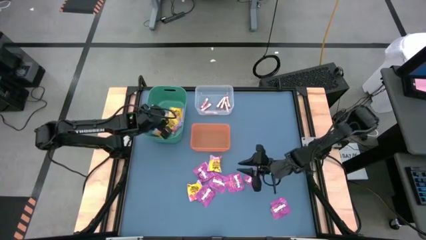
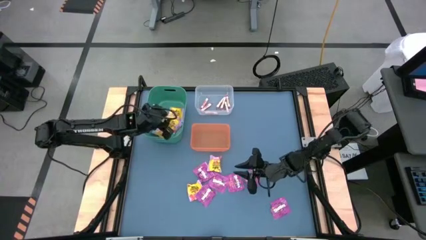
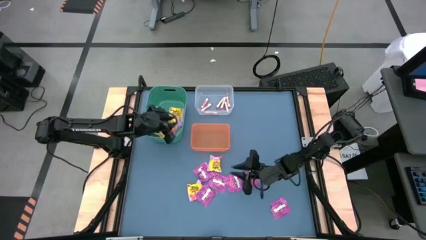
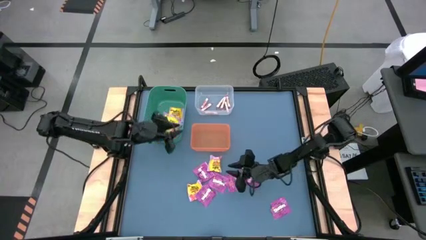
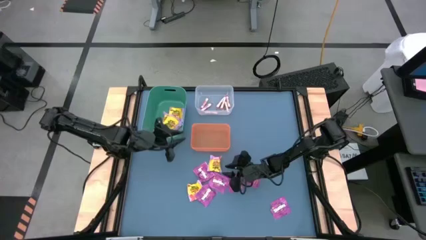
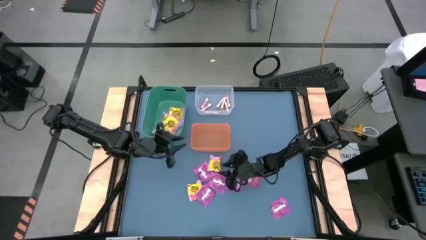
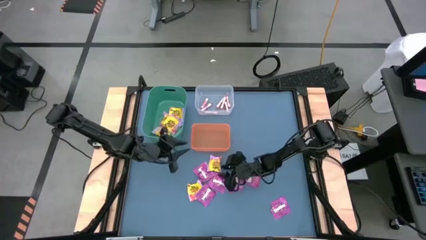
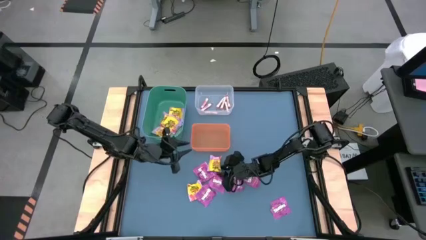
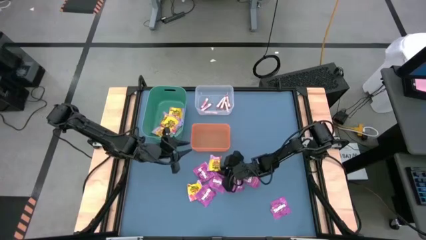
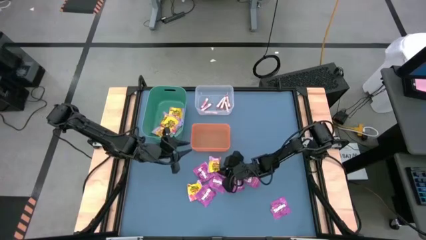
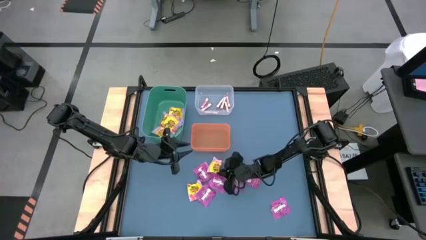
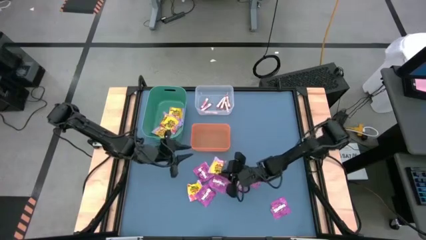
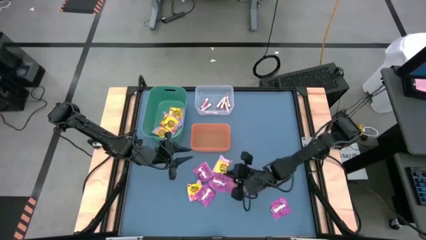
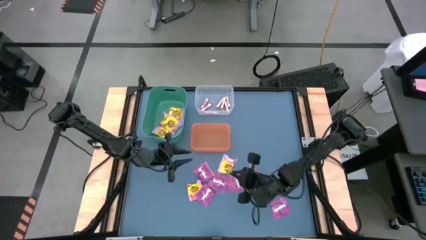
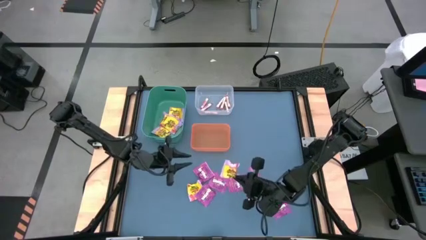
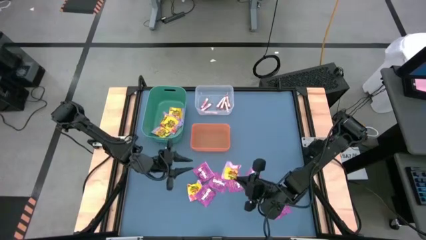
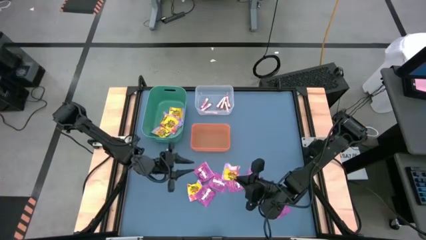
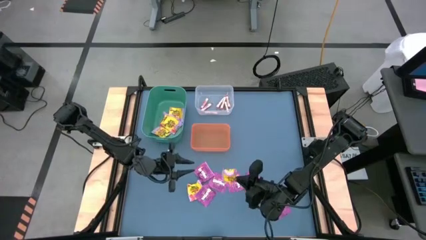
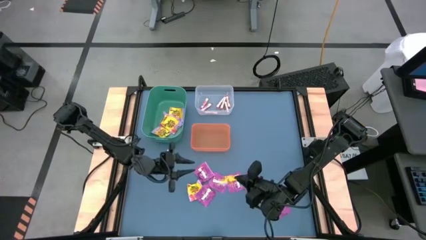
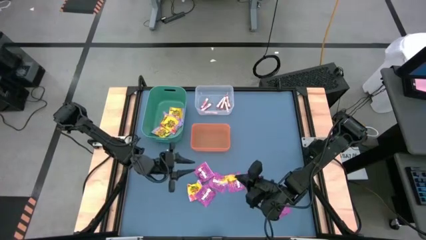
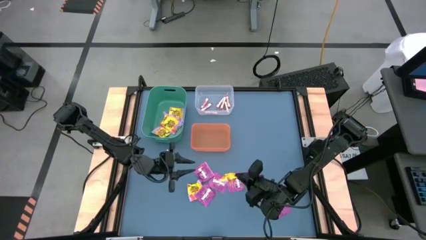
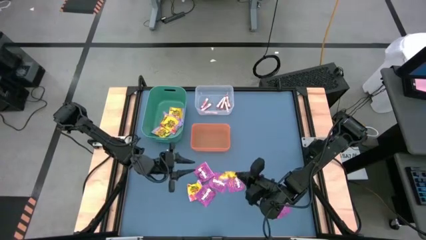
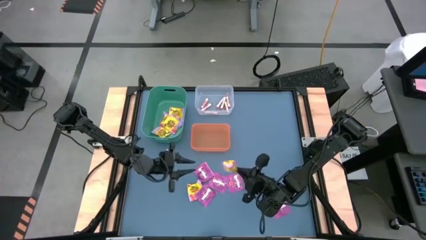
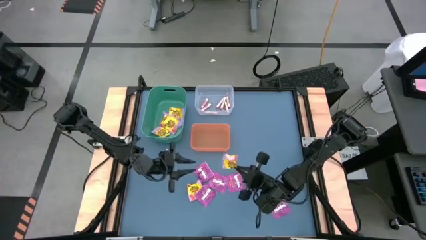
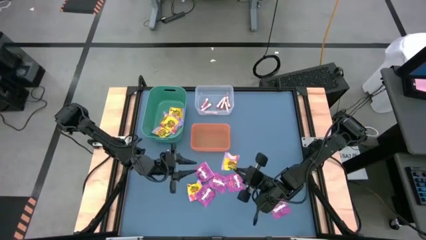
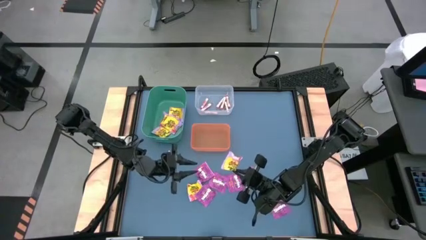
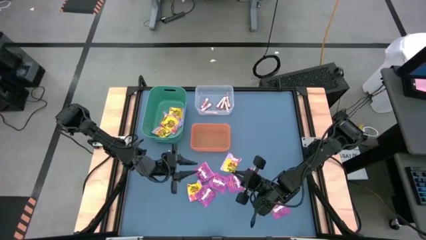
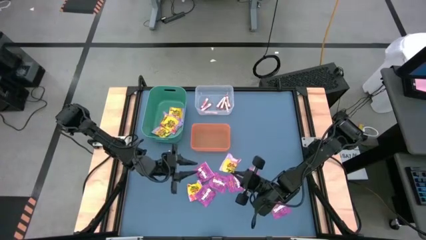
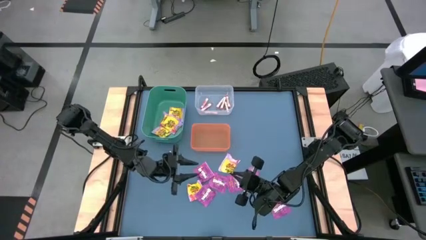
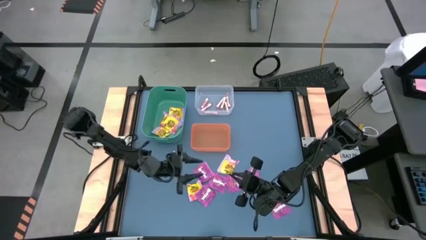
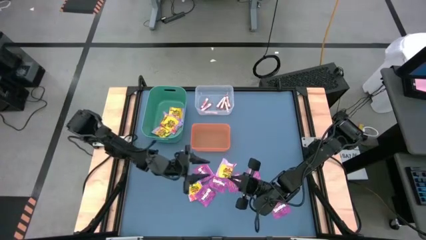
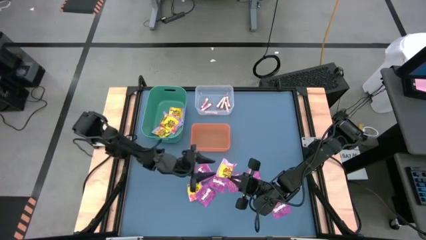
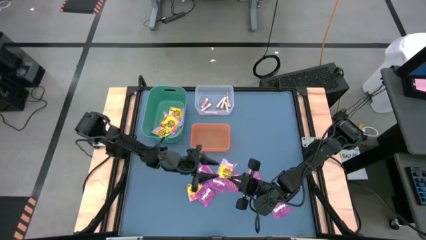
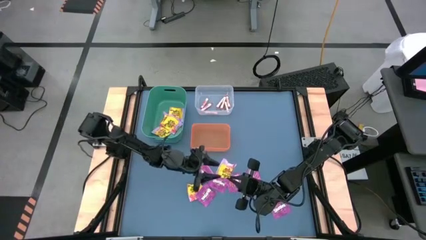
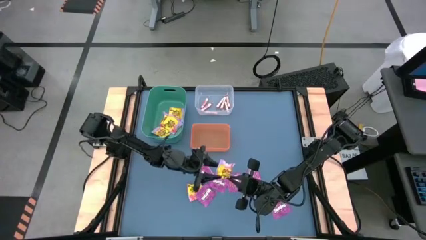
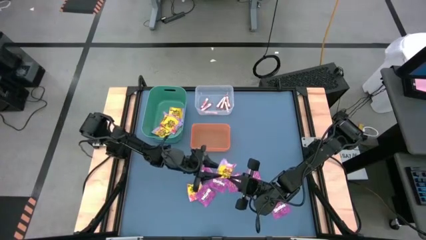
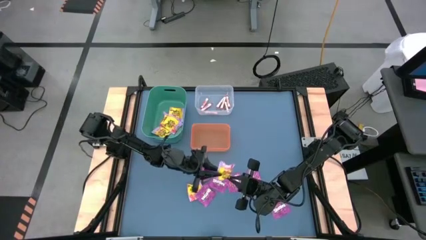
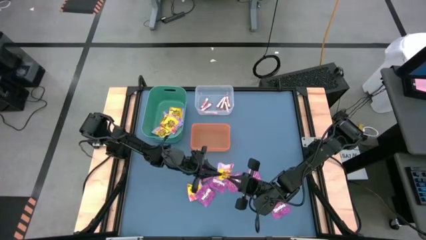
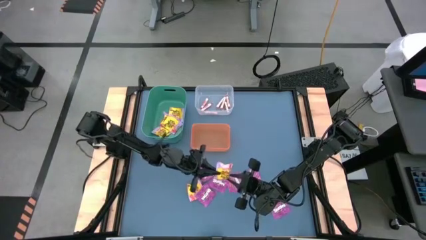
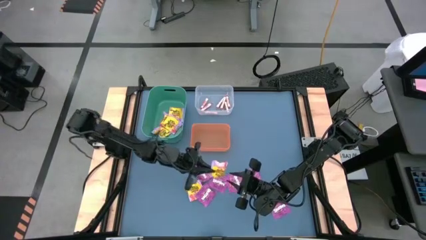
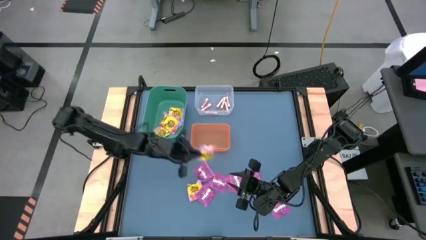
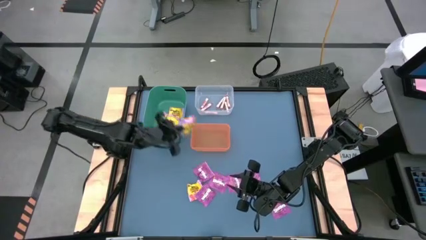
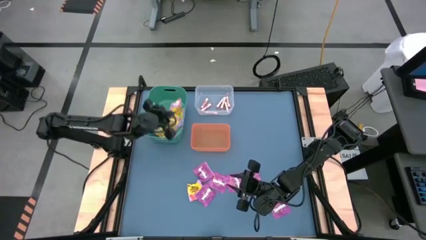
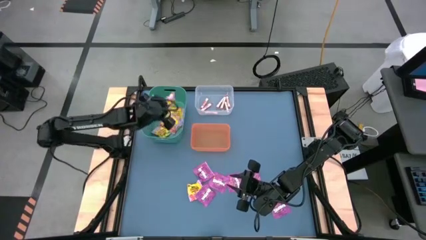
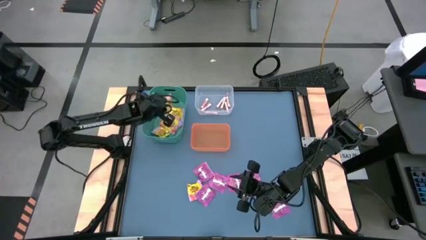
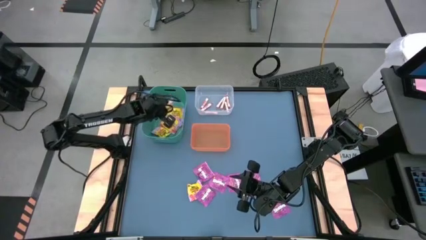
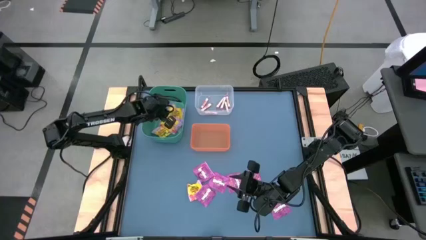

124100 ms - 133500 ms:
Task: Sort candy
Put the yellow candy into the green bin

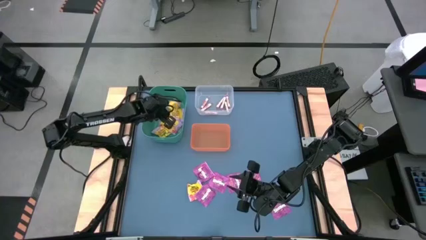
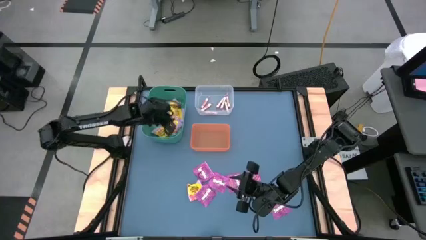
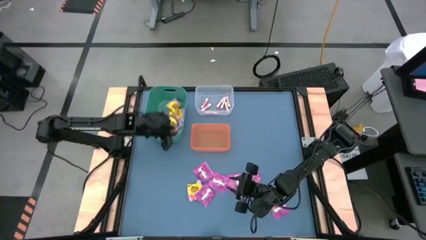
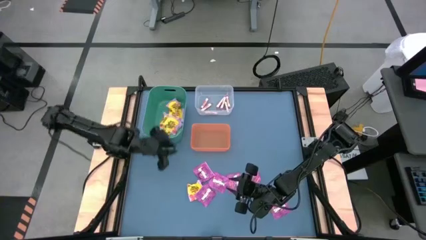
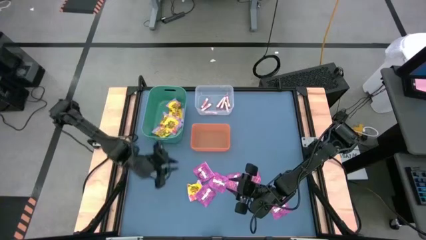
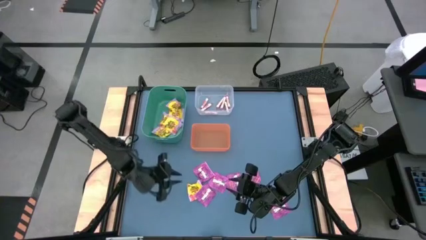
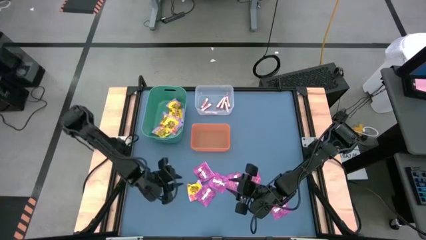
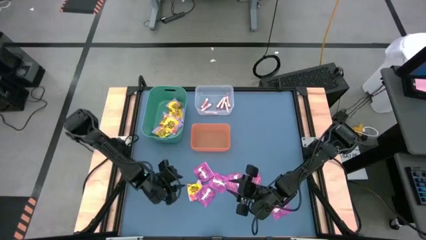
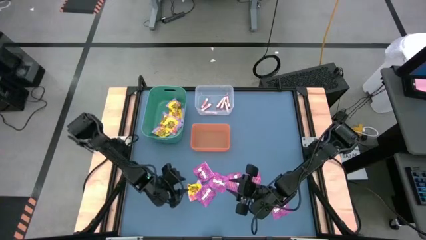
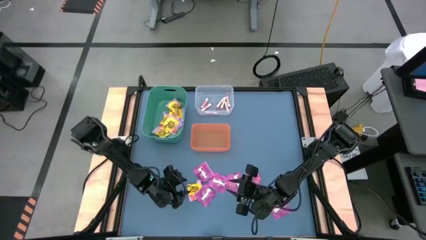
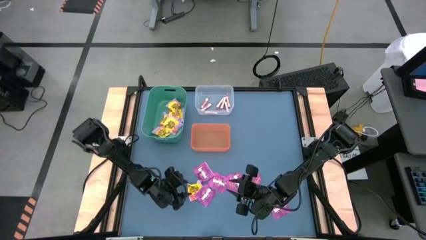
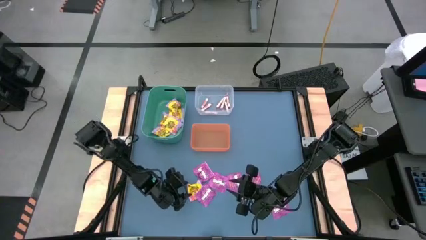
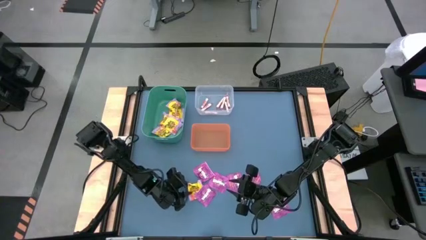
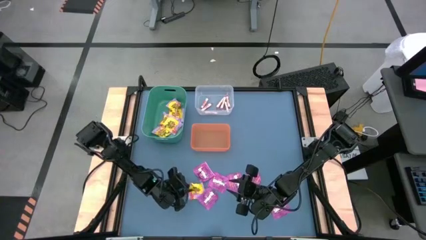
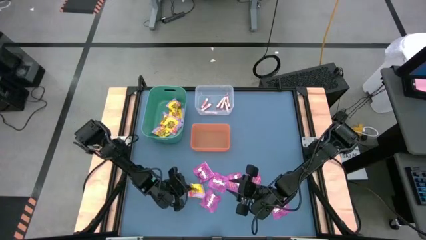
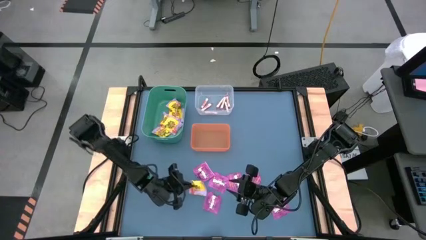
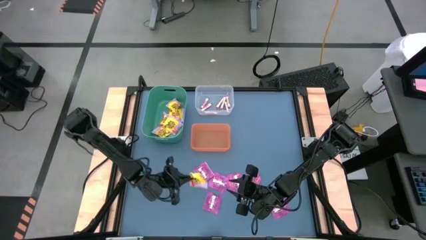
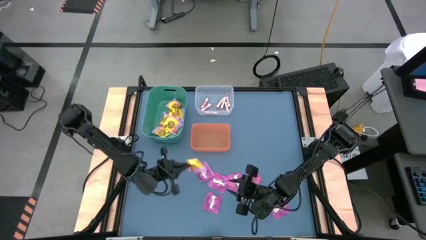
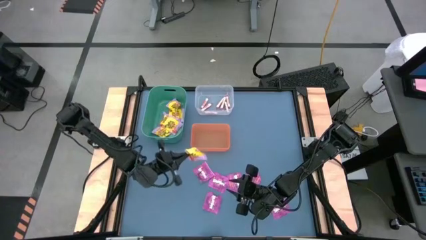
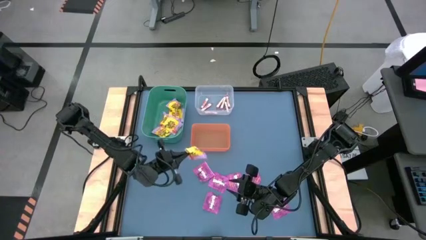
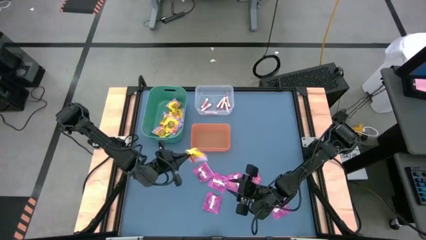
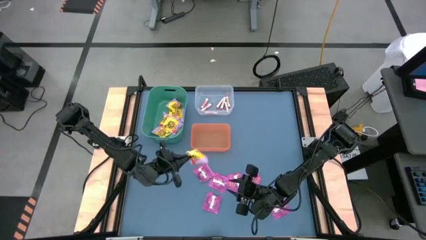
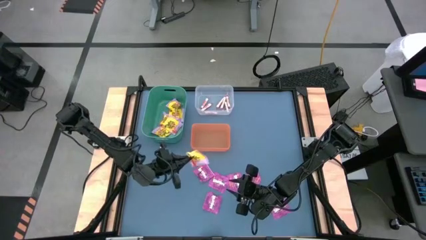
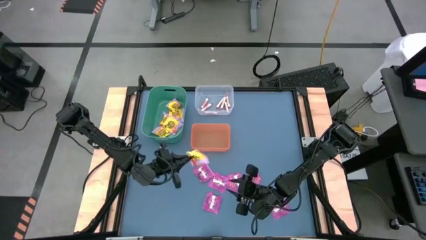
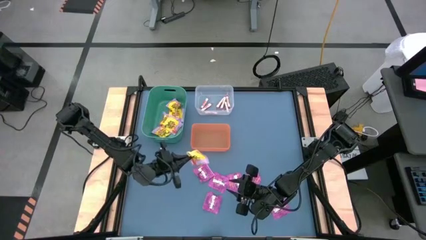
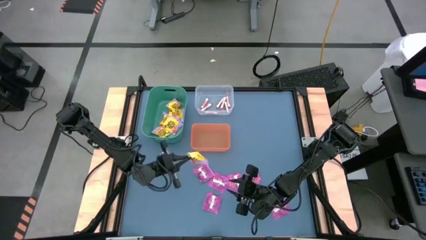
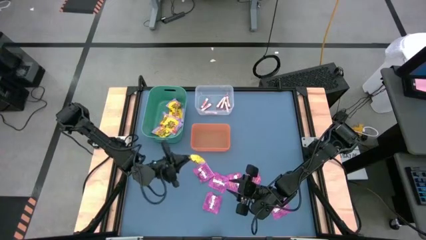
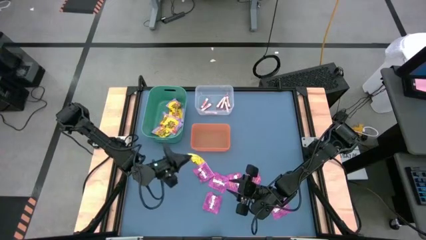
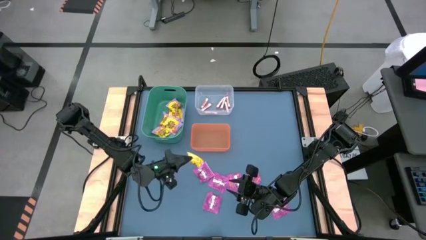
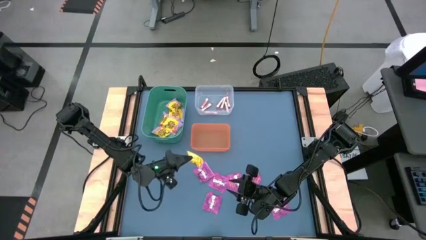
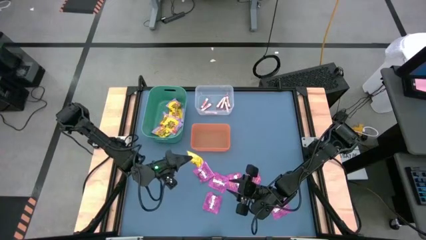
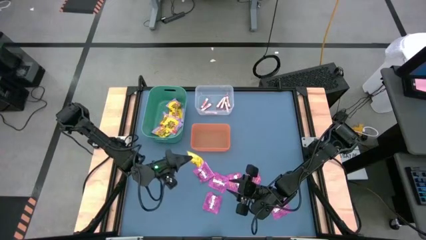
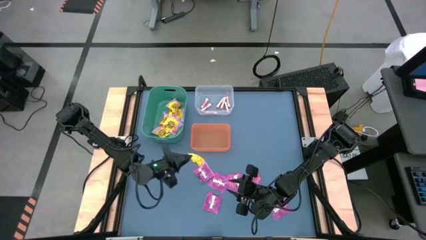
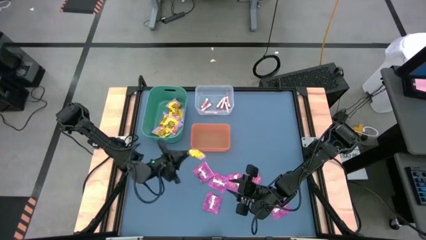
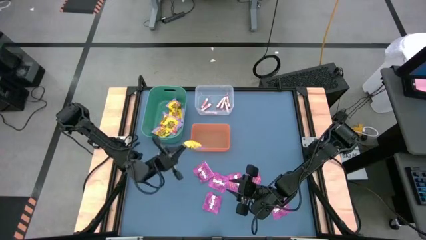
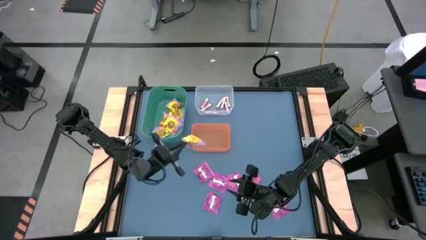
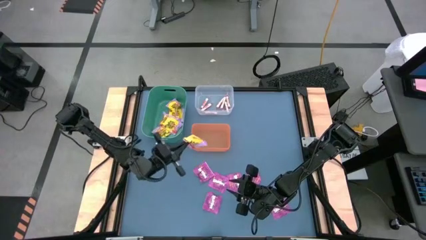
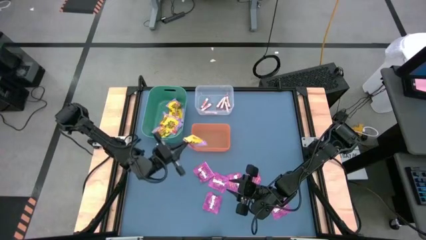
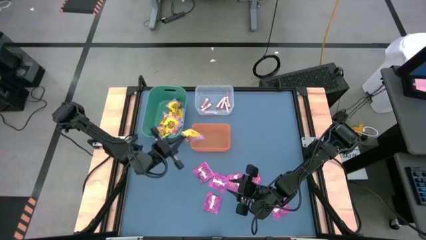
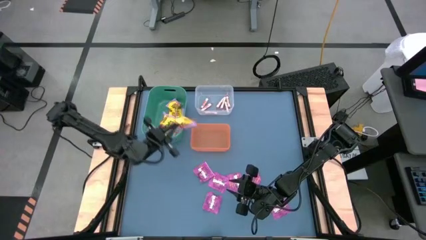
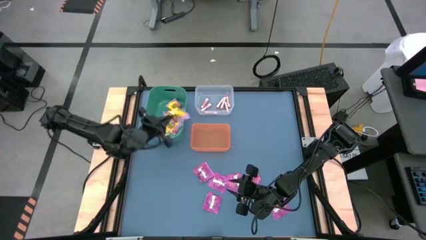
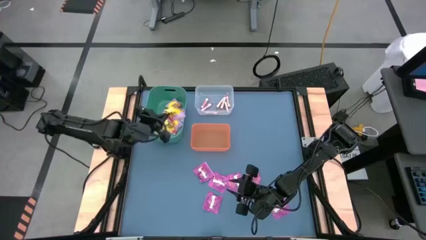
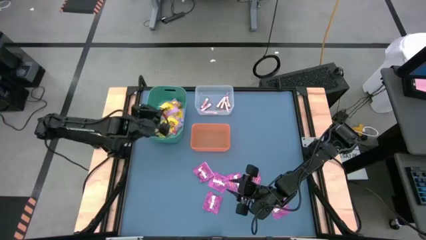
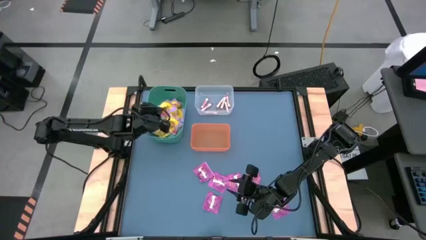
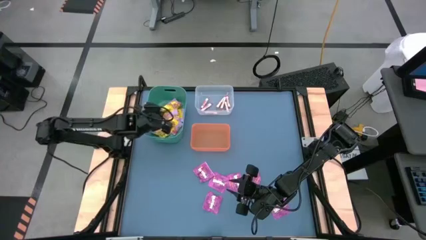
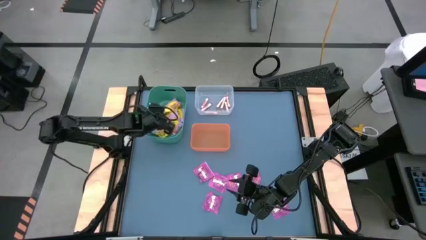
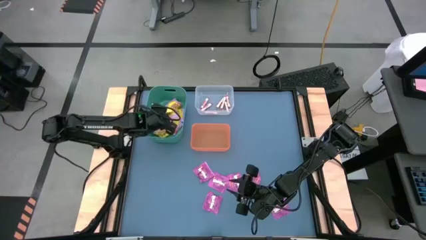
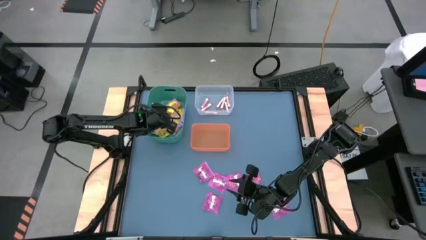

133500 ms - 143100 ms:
Put the yellow candy into the green bin
